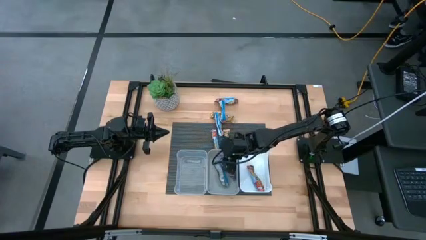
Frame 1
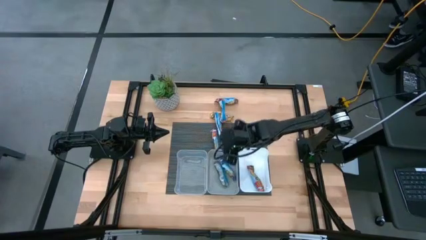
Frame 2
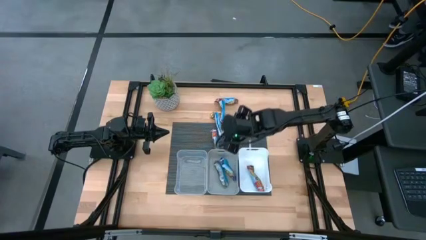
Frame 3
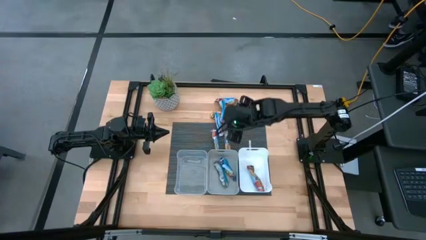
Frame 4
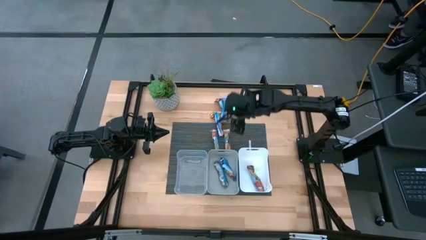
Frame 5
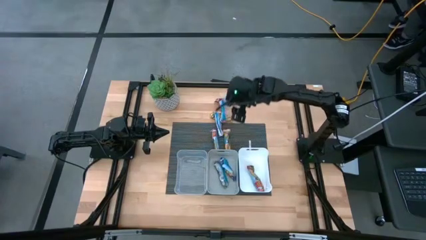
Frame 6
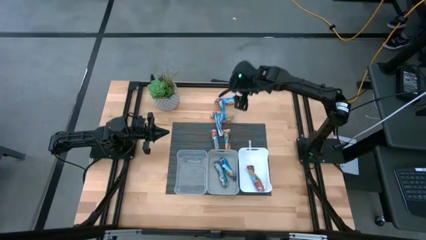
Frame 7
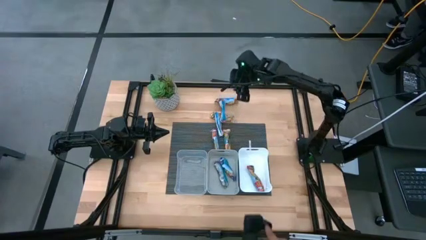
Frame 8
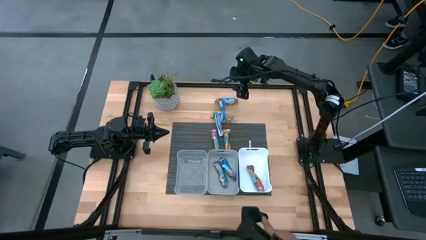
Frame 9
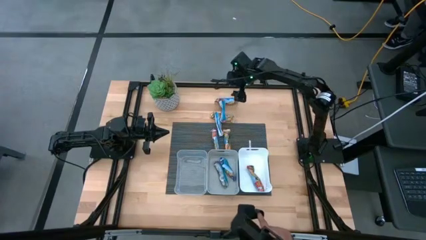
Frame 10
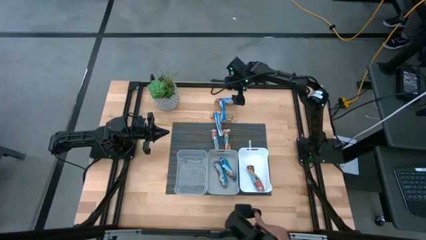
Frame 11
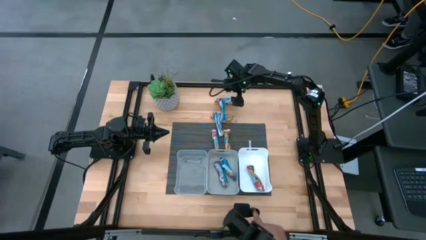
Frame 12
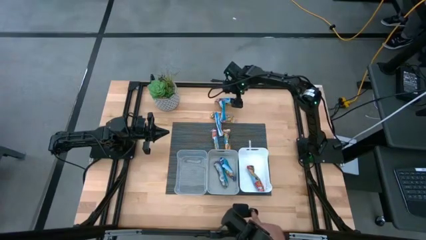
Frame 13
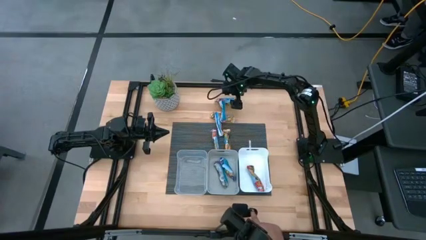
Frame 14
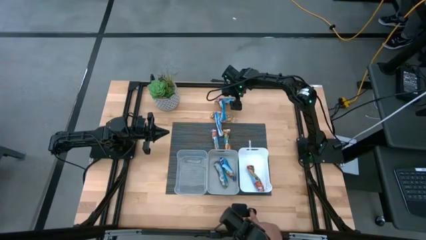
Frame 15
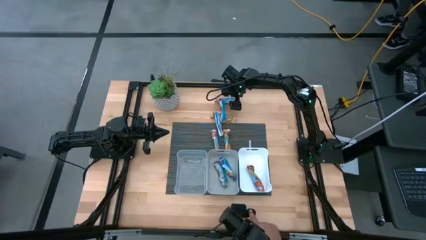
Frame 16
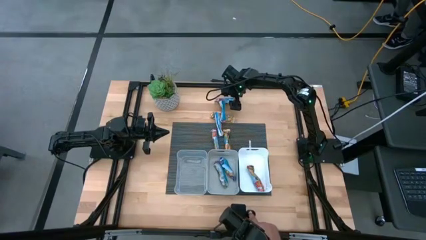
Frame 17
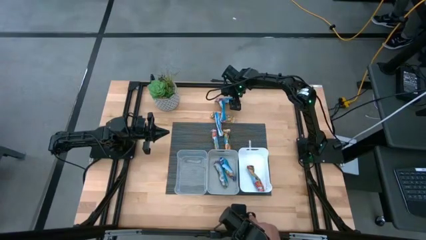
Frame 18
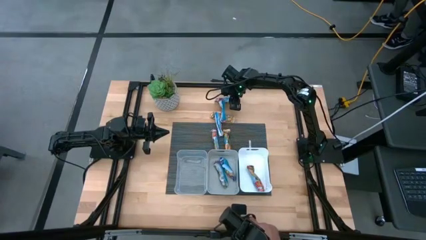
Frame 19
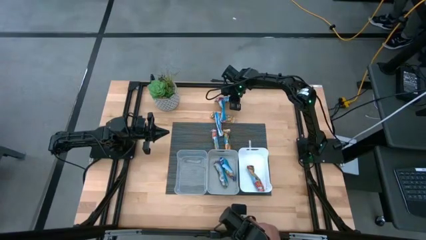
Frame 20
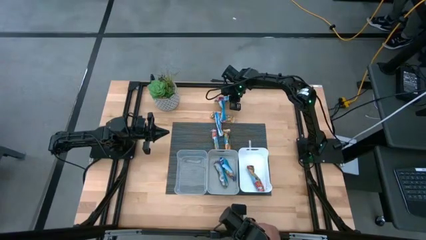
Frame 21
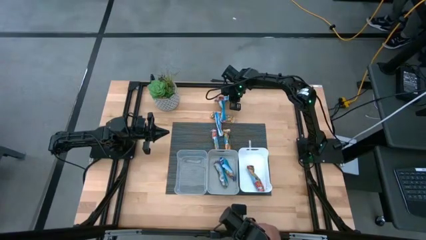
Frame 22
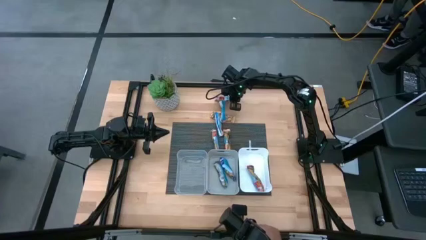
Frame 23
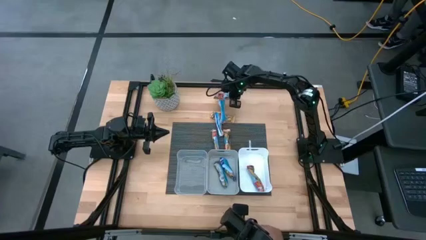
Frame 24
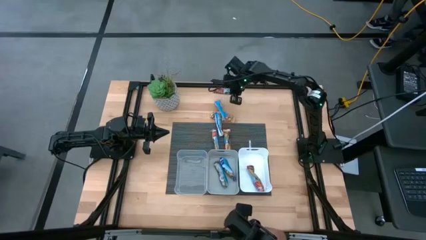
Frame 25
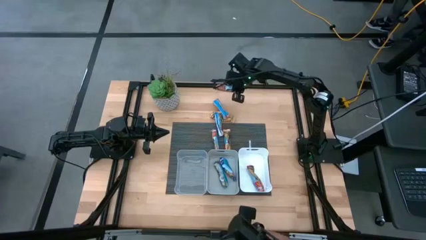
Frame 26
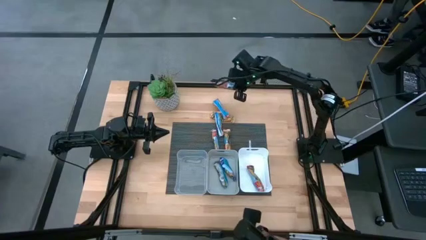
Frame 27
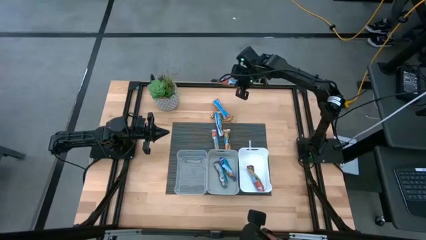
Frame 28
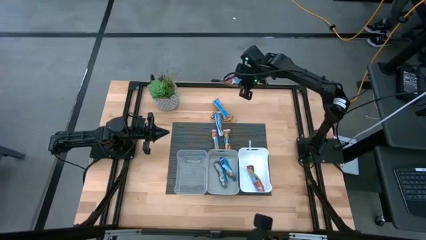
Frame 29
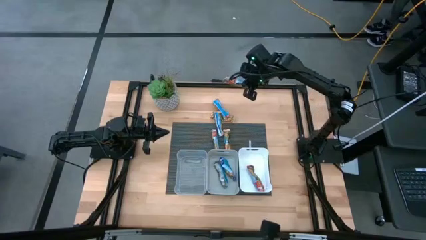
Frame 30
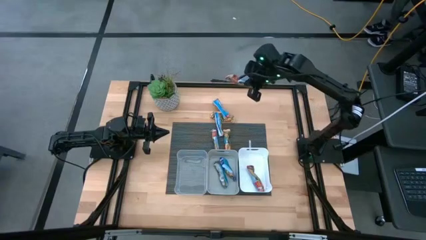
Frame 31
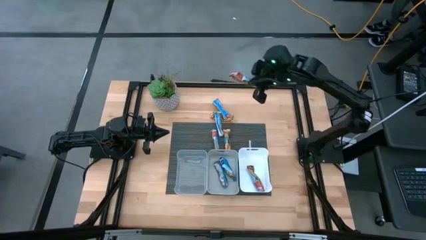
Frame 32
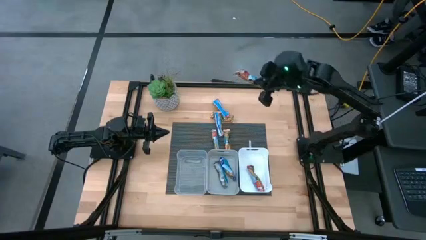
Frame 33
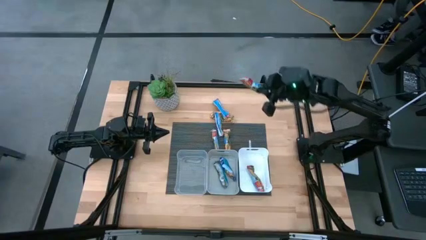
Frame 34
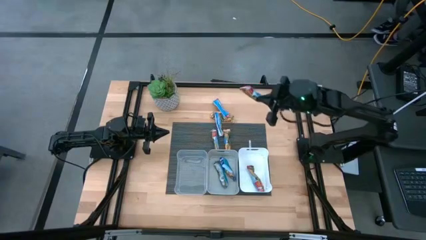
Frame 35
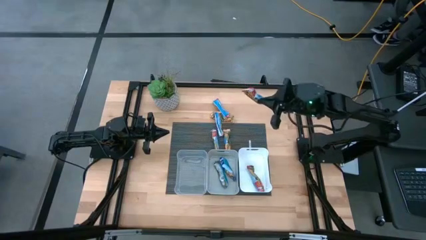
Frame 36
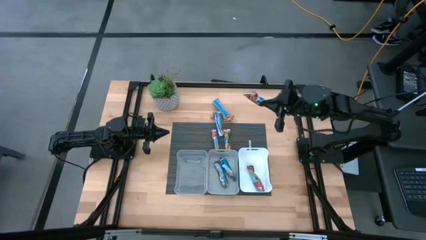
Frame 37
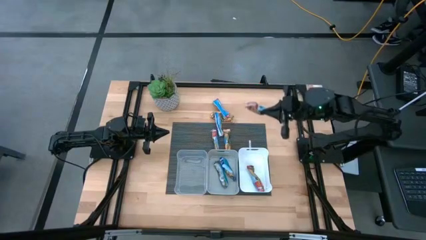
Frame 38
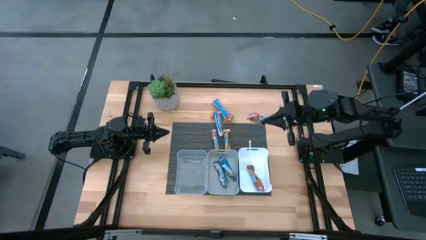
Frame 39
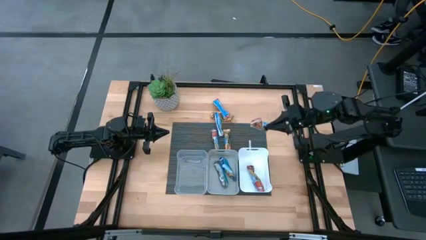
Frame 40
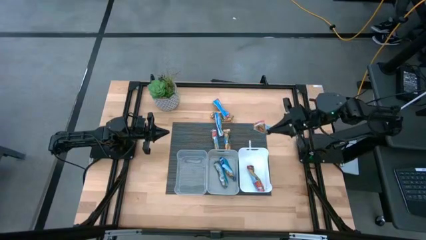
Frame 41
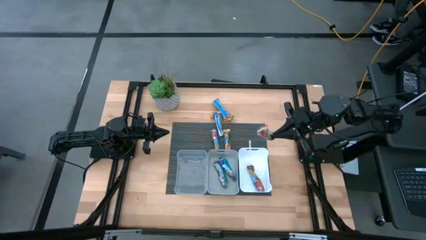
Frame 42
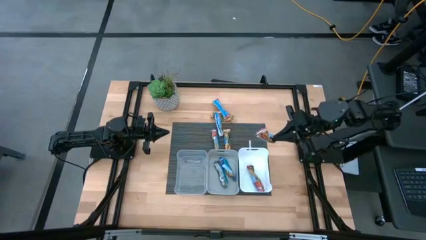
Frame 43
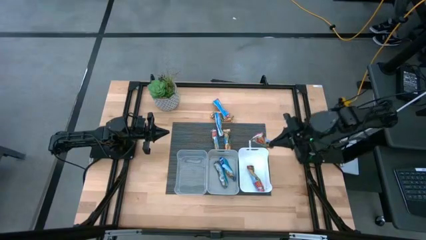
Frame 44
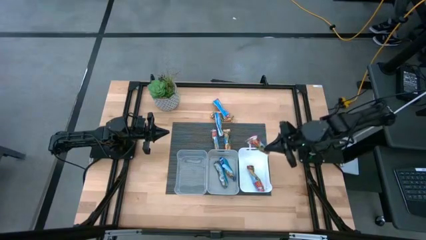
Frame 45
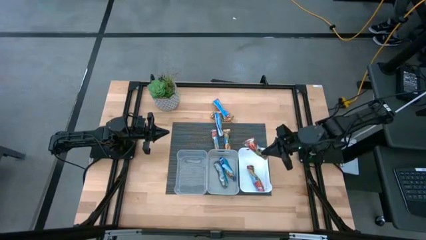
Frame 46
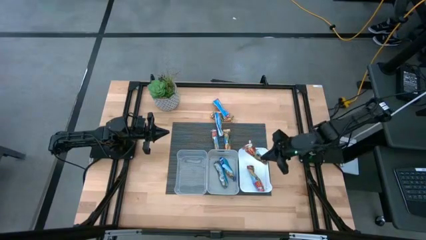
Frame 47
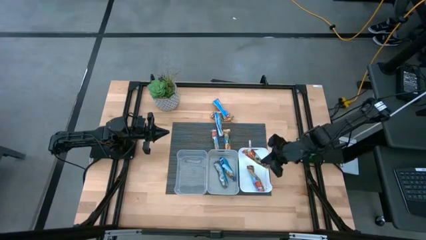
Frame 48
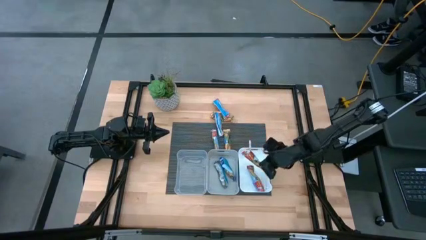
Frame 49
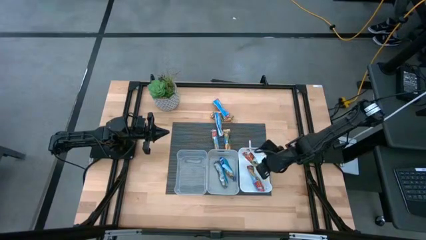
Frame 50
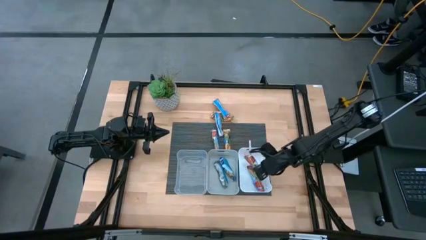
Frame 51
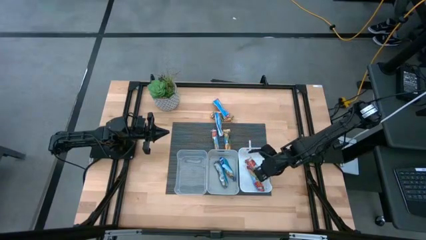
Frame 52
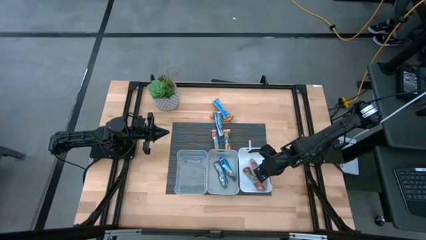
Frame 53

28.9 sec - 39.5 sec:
Task: Pick and place Granola Bars by type
Put the red granola bar into the white bin

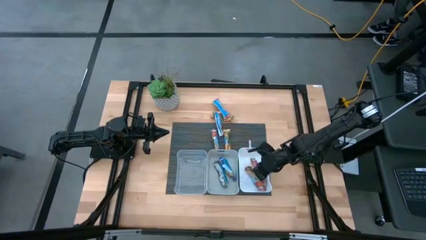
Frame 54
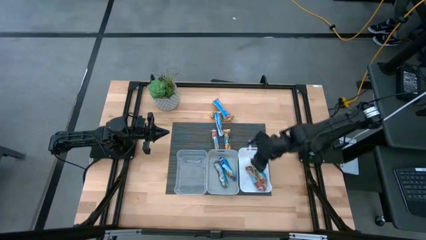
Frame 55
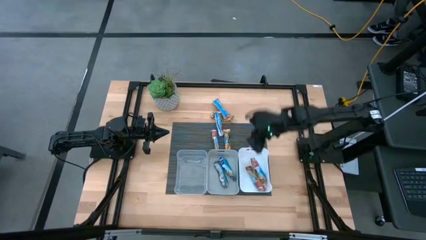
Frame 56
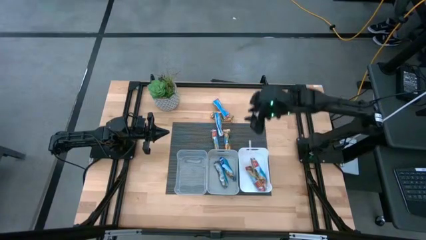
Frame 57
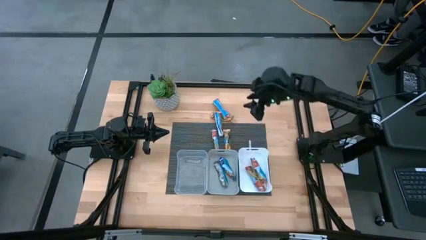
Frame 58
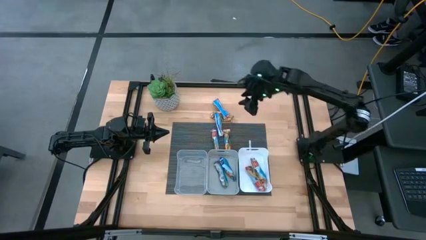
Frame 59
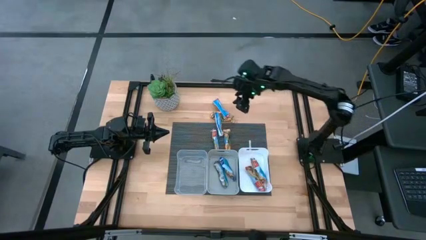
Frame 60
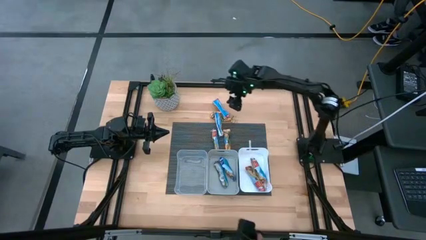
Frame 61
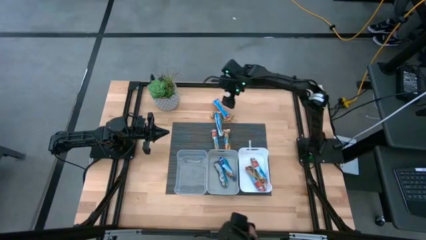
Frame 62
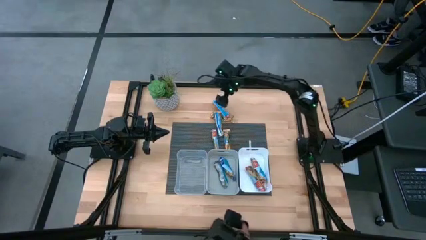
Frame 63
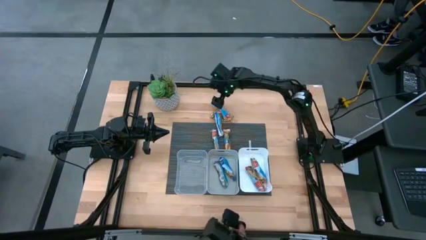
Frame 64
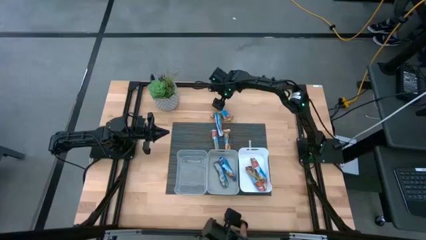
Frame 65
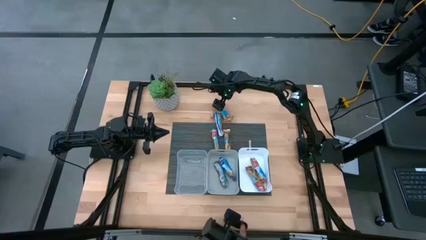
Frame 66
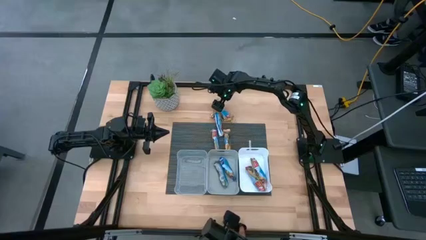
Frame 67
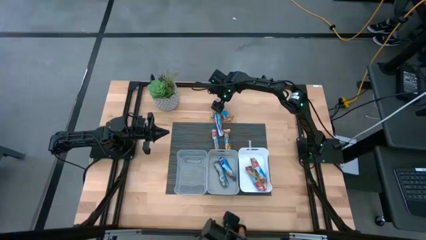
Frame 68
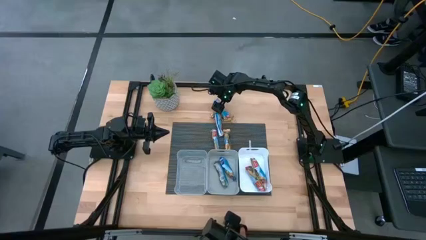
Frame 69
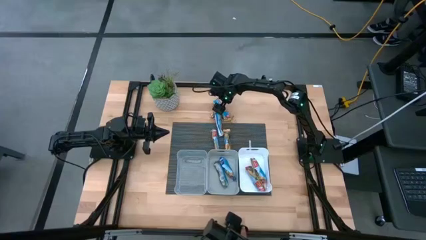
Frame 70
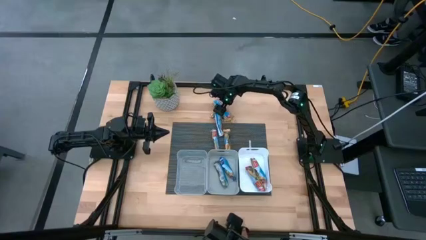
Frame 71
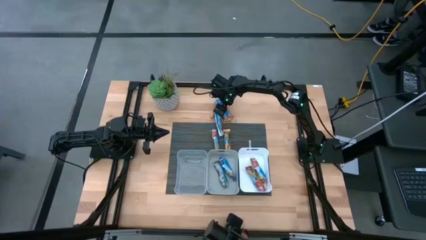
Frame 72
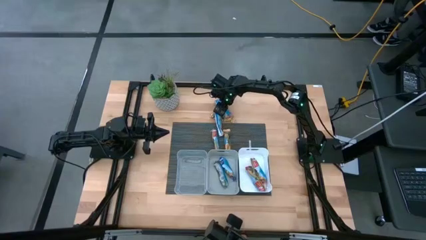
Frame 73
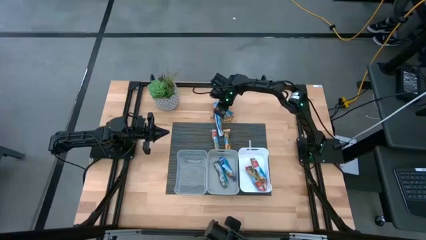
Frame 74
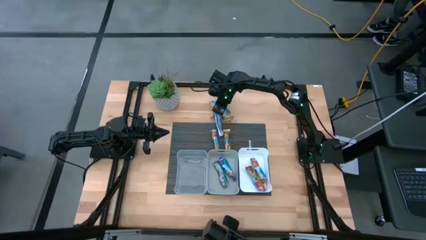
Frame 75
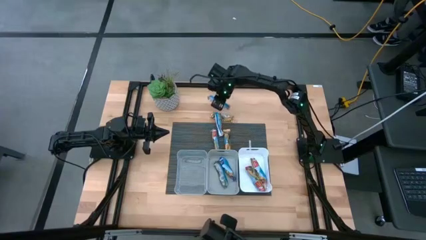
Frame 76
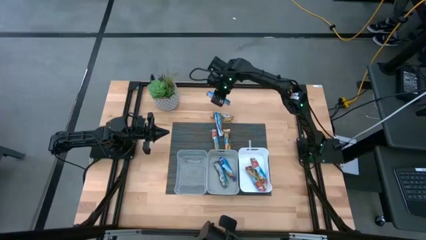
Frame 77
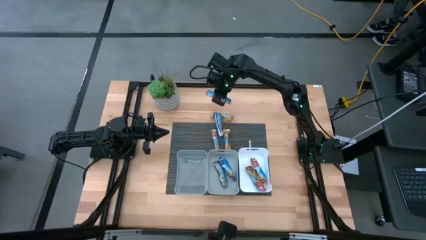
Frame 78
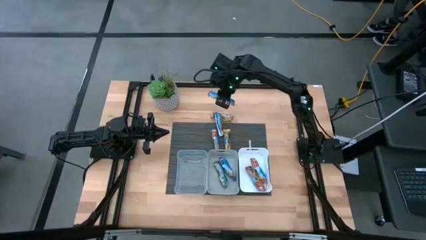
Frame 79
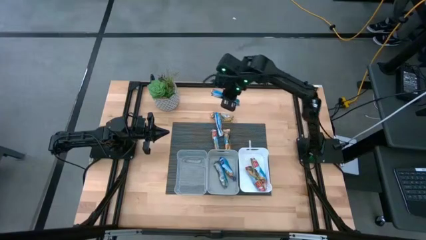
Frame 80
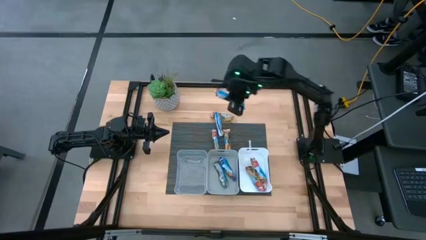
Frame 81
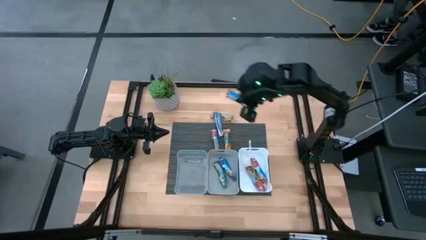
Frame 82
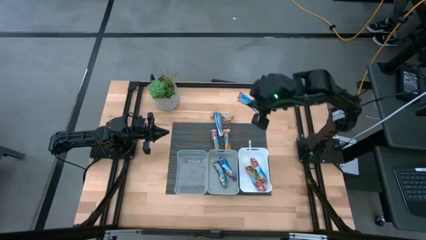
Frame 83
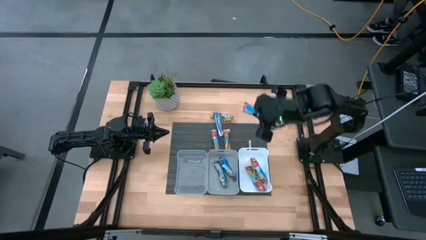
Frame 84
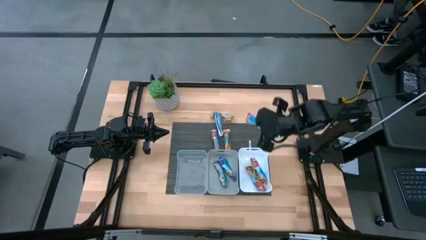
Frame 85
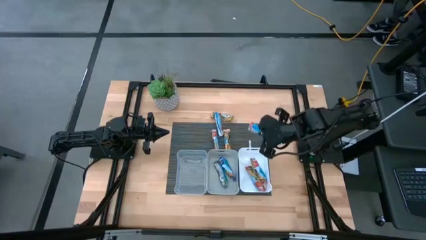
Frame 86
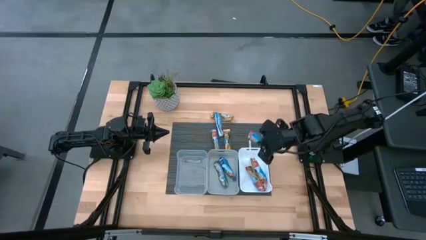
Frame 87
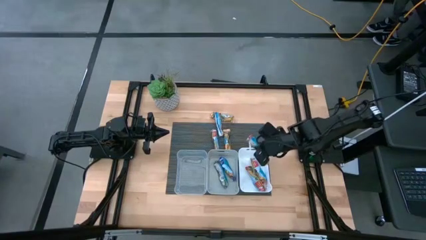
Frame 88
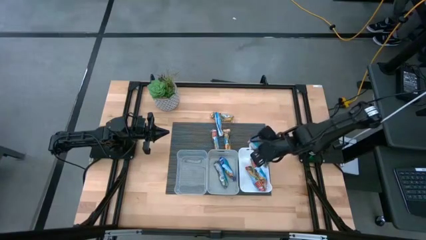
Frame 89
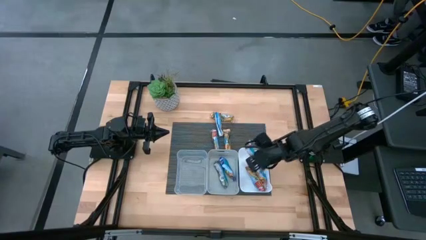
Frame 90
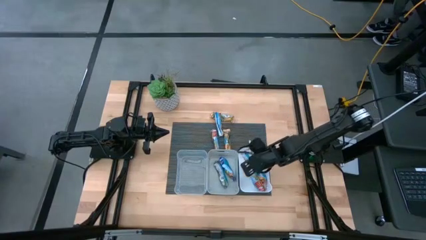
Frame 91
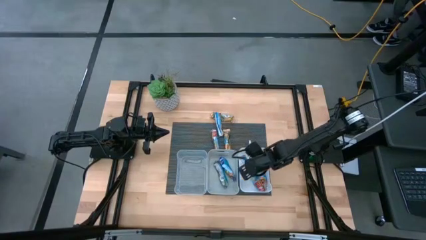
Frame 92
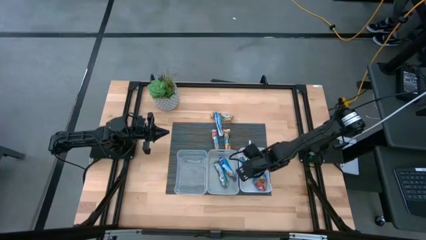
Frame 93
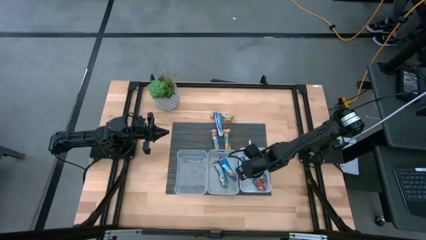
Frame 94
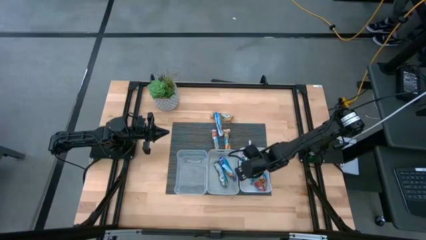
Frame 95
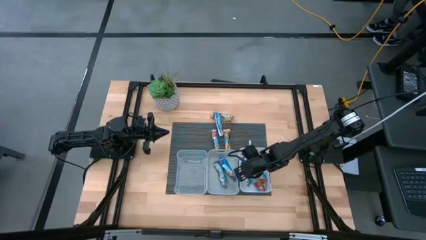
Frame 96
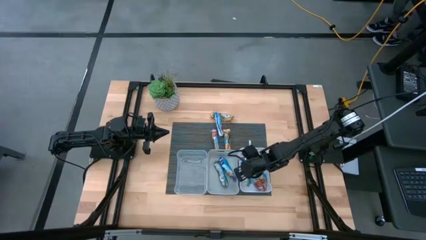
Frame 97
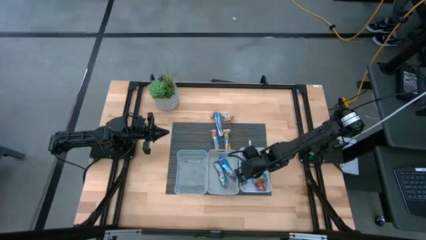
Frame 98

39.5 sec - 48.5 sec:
Put the red granola bar into the white bin
